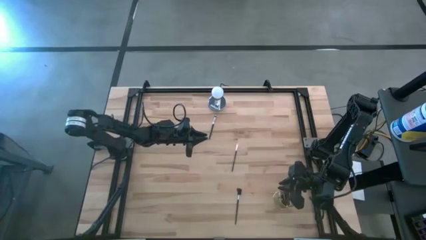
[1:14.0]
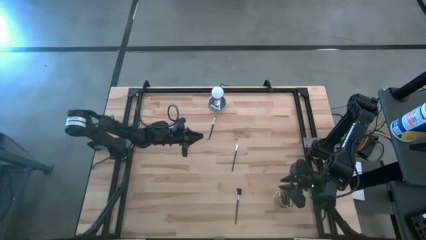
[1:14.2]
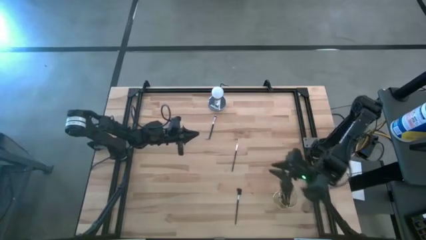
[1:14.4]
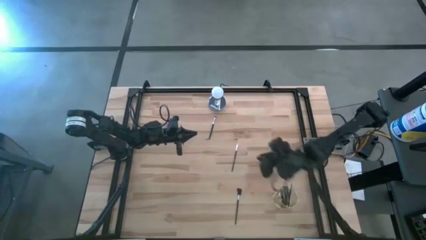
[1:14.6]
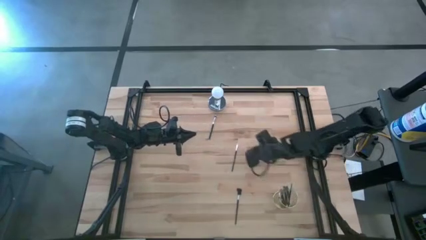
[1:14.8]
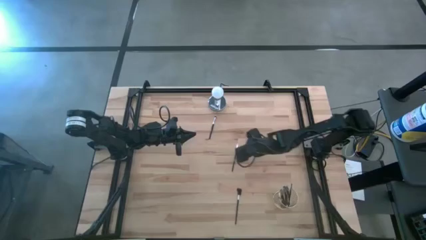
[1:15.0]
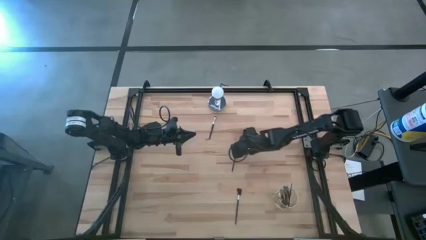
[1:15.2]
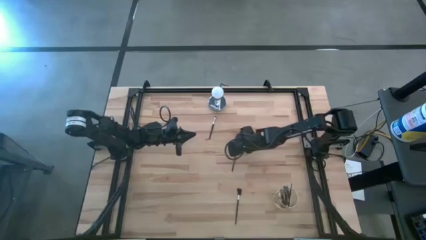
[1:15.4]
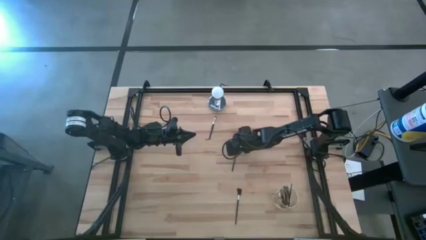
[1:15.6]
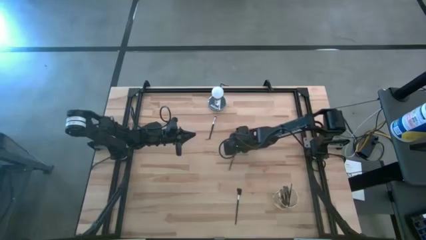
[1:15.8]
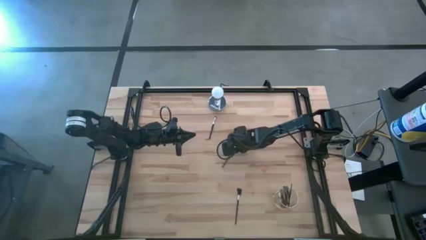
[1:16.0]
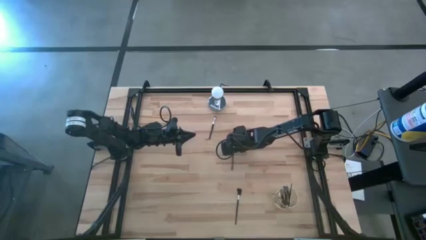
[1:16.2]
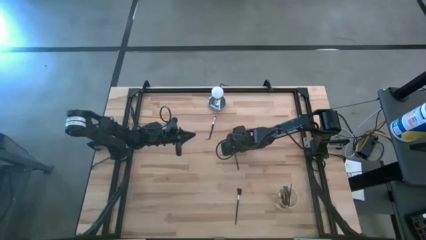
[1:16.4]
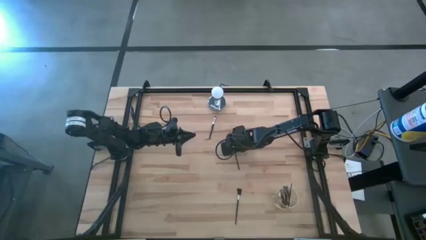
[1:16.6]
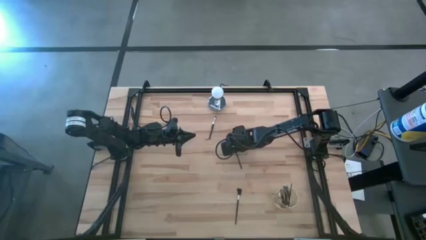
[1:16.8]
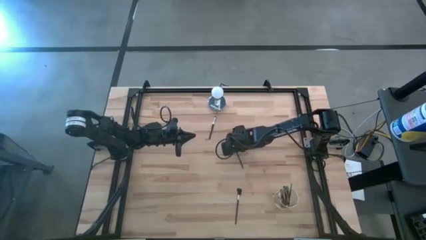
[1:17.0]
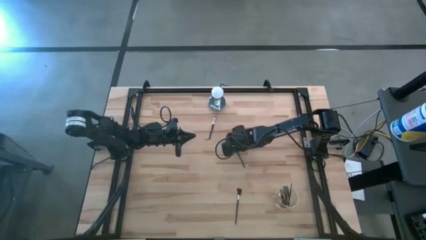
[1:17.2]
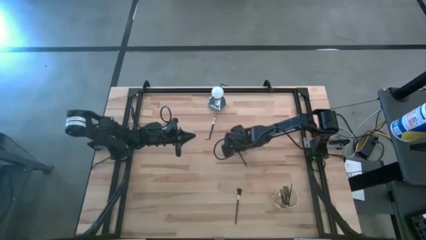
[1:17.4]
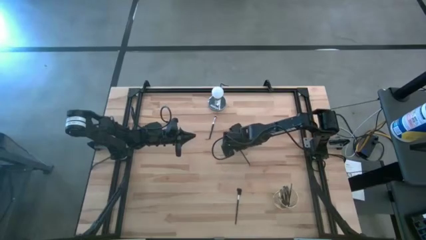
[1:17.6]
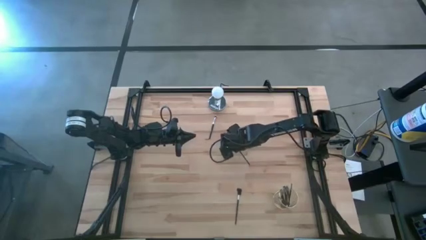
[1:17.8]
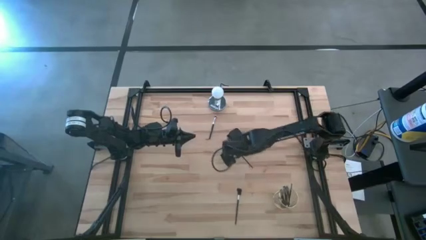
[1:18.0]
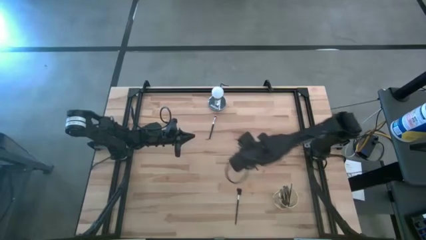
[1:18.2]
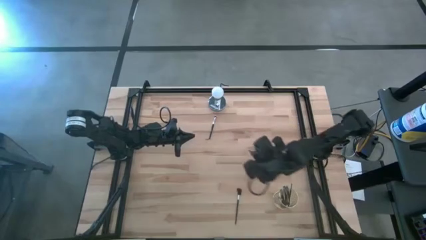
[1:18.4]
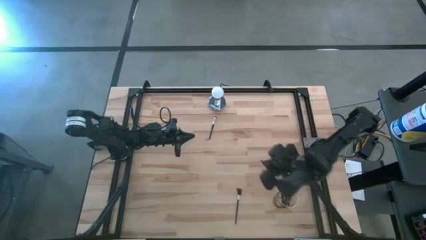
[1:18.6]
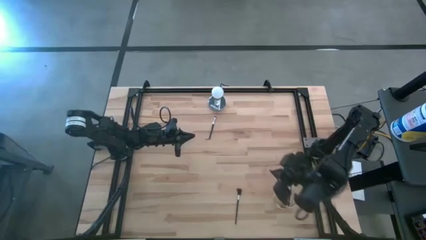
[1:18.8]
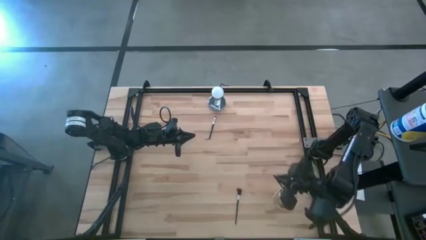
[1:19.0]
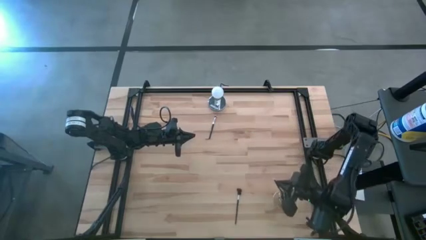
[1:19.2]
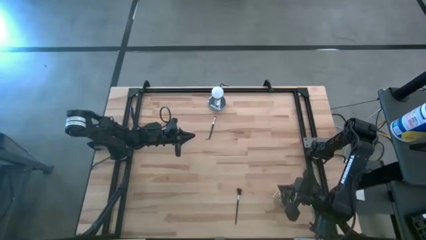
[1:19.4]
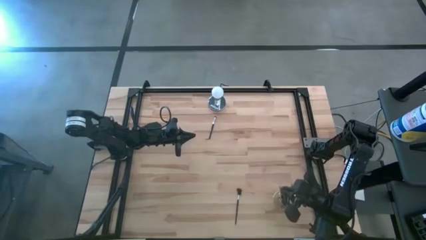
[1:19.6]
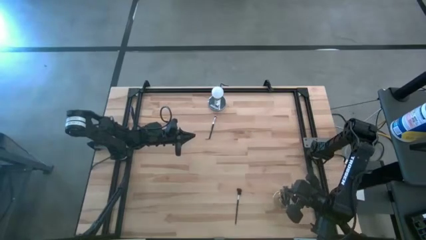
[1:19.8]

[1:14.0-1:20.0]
Task: Pick & Place Makeup Supplies
Put the silver makeup brush into the gold makeup holder

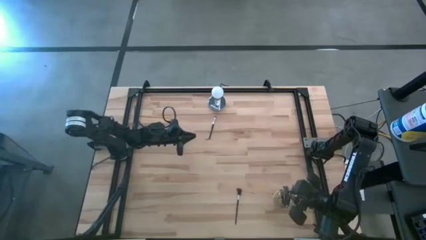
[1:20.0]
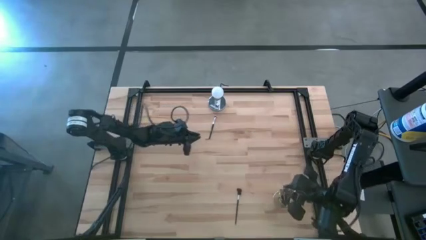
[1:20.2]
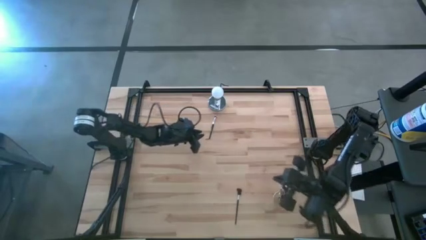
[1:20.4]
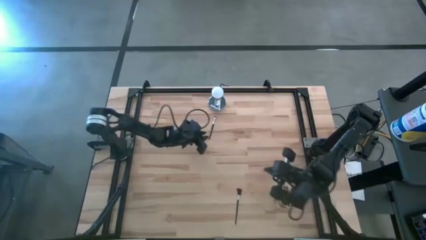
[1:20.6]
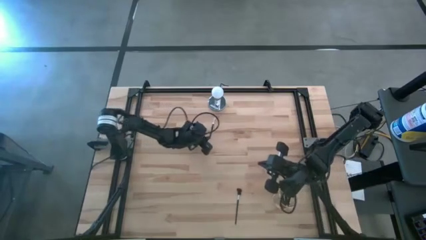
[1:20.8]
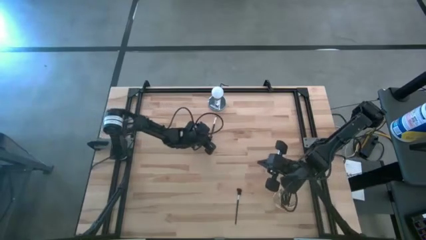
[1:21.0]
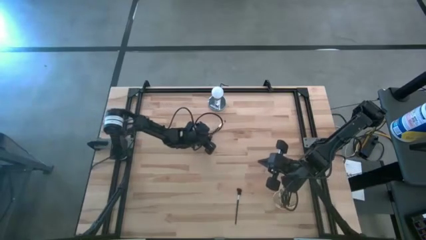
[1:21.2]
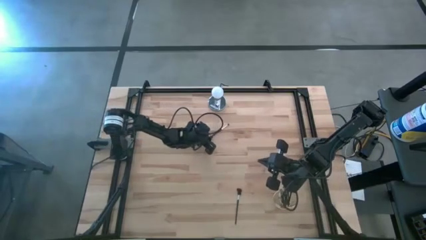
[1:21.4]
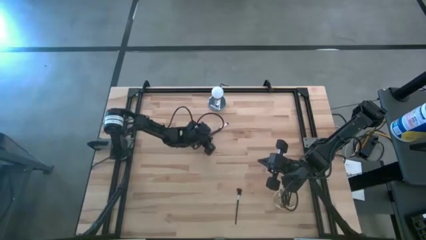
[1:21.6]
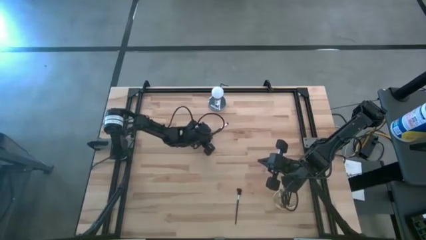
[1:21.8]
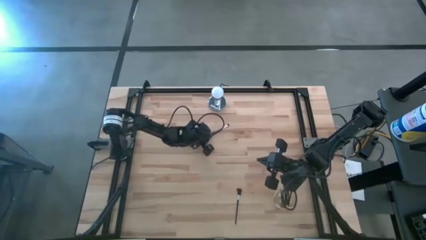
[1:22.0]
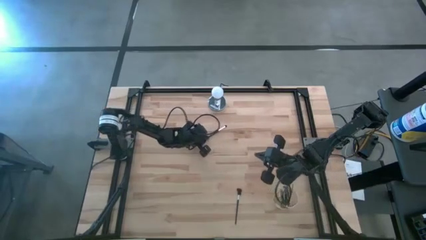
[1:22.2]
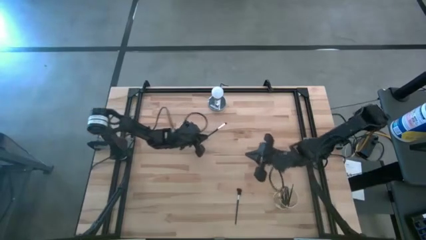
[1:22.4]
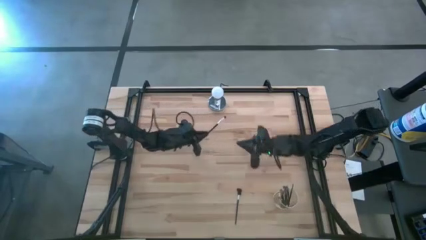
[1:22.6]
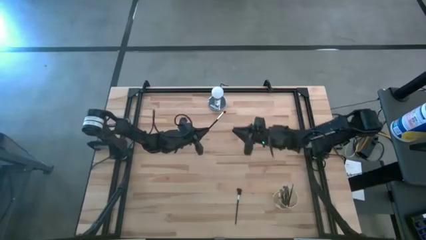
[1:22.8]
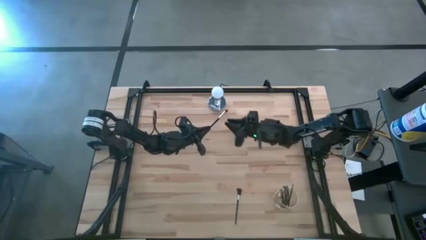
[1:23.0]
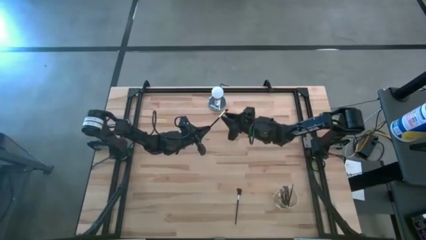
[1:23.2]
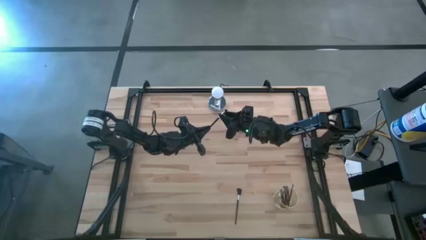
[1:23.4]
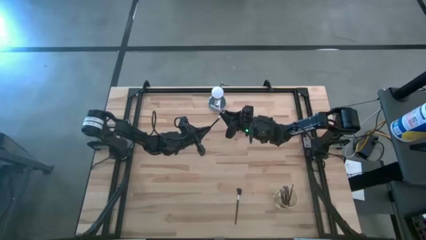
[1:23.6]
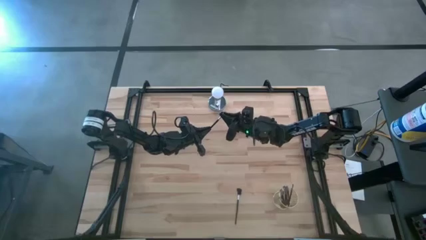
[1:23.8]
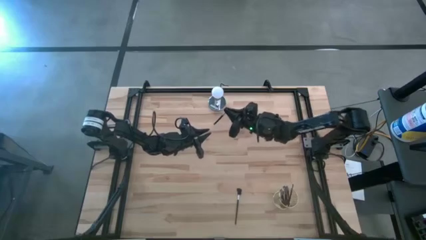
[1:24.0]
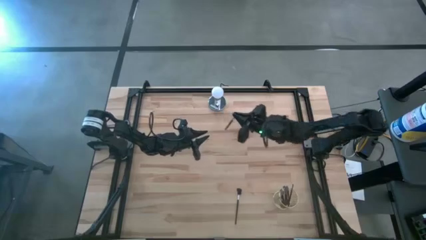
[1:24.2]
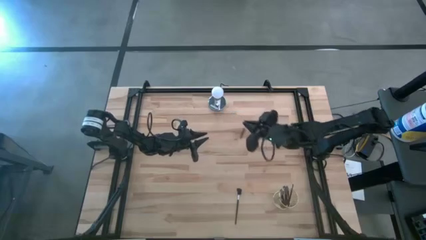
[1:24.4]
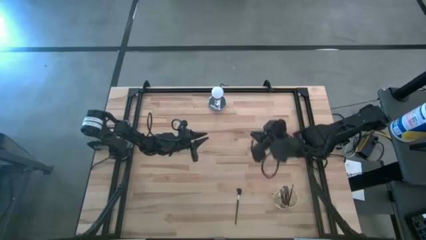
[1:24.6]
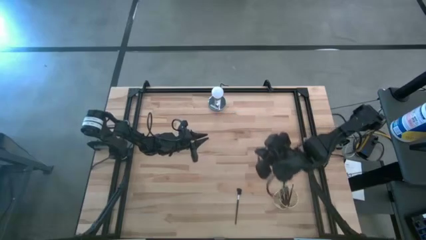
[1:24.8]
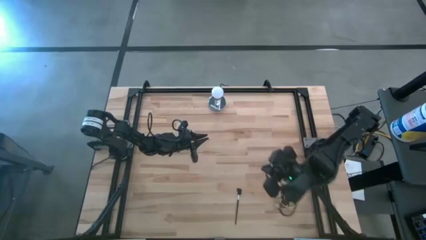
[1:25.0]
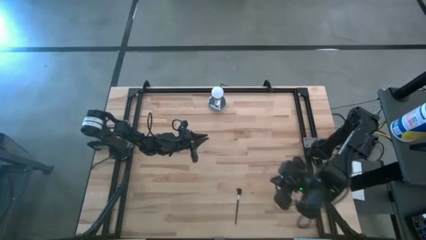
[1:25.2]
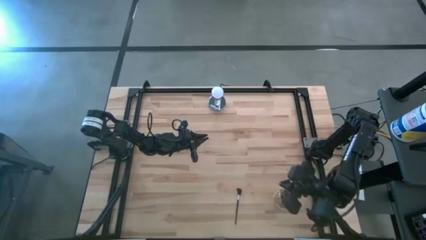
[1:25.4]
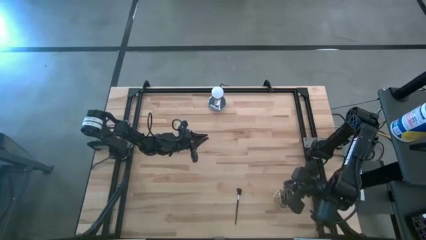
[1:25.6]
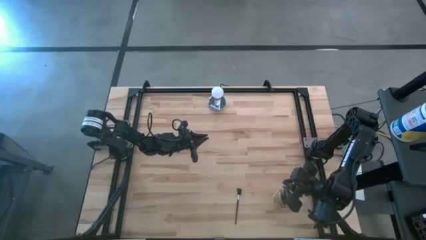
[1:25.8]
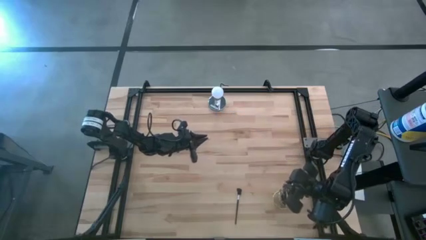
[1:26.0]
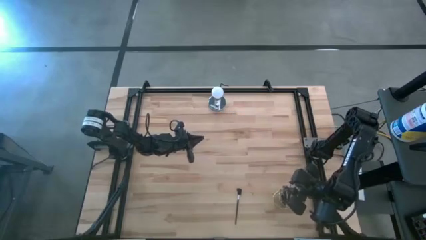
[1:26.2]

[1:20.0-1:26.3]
Put the silver makeup brush into the gold makeup holder

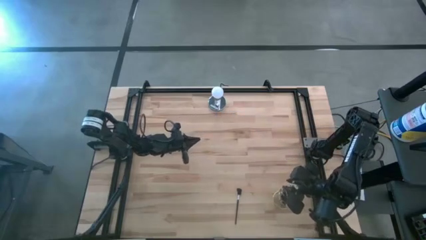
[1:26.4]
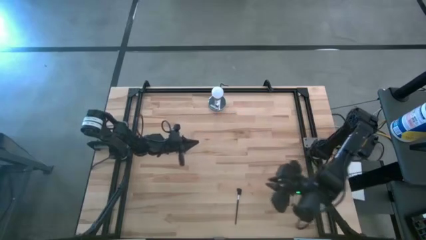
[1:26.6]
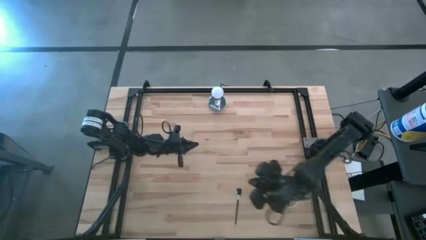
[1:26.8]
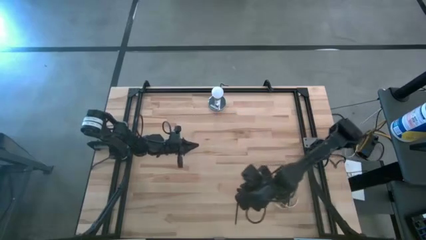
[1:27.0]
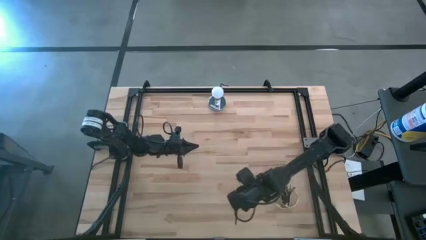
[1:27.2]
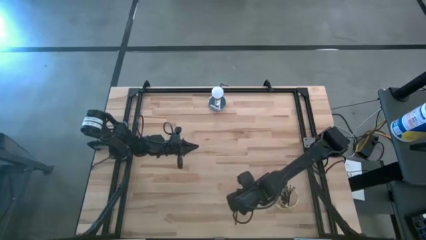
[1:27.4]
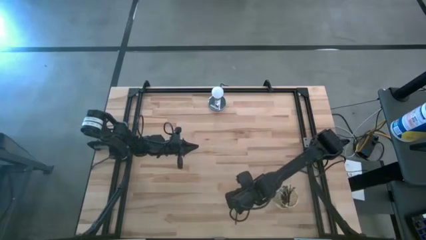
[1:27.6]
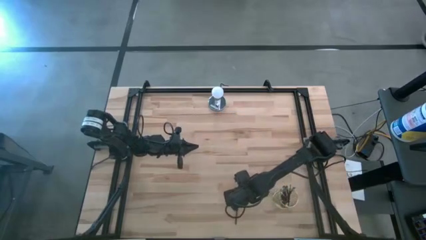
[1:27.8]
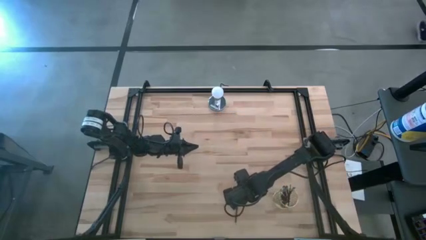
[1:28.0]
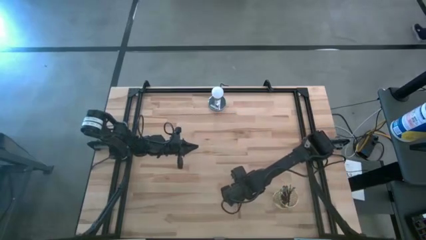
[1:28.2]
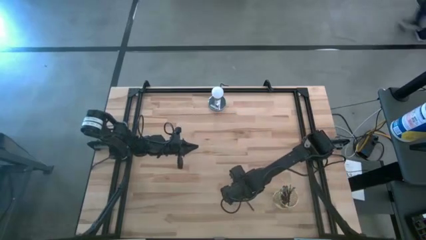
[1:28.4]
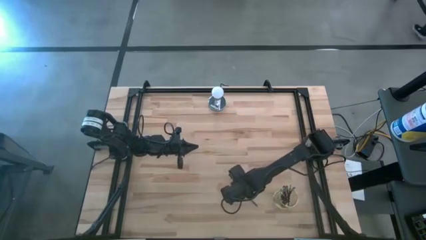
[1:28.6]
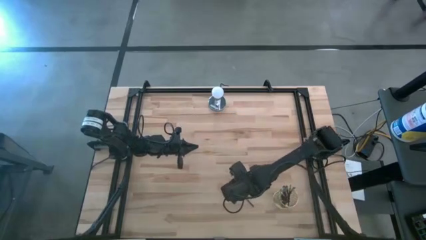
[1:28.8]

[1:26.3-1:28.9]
Put the silver makeup brush into the gold makeup holder

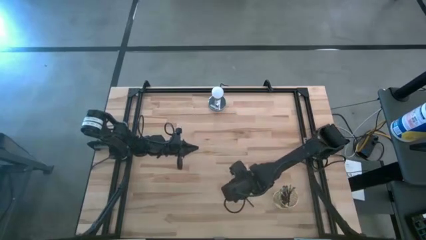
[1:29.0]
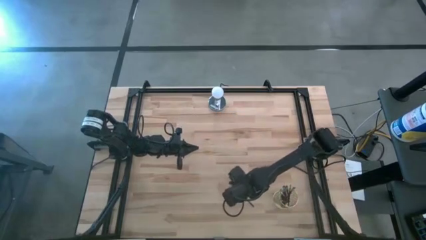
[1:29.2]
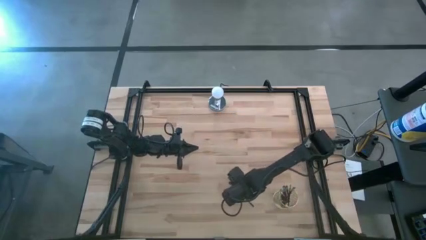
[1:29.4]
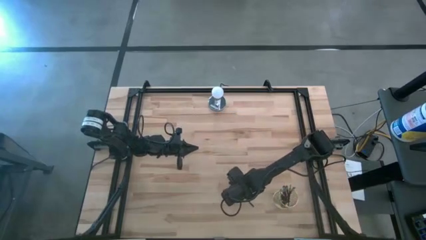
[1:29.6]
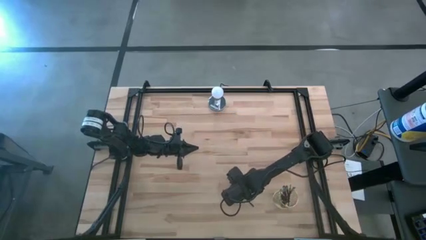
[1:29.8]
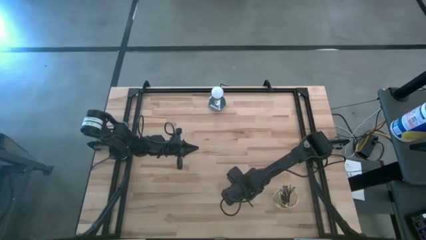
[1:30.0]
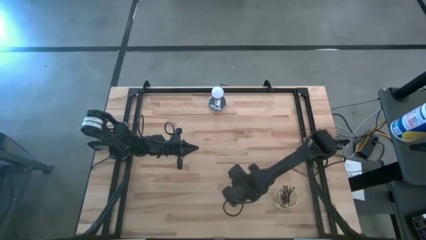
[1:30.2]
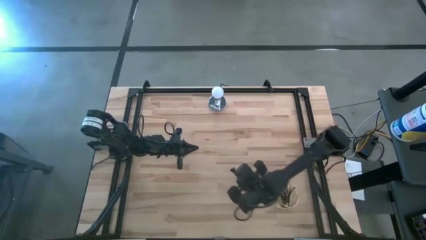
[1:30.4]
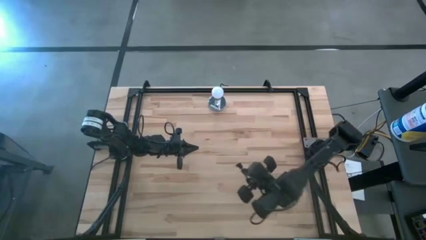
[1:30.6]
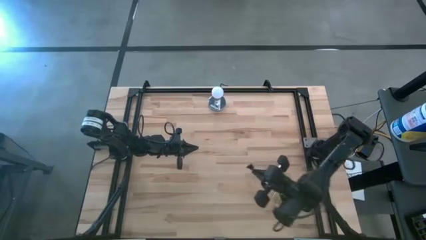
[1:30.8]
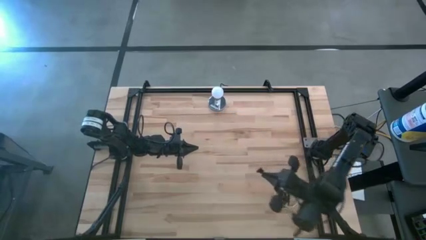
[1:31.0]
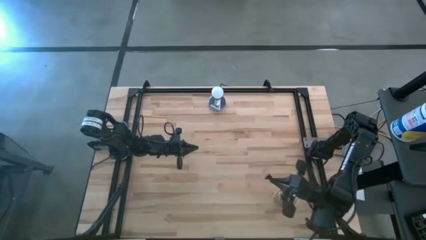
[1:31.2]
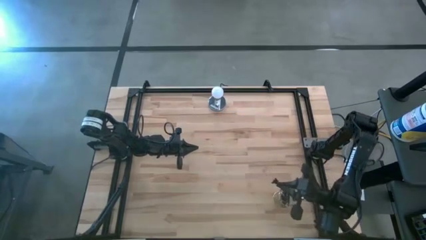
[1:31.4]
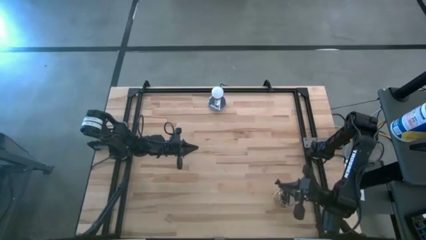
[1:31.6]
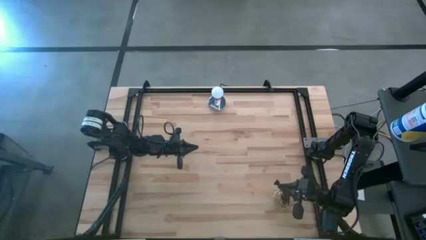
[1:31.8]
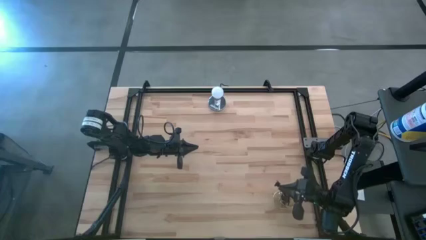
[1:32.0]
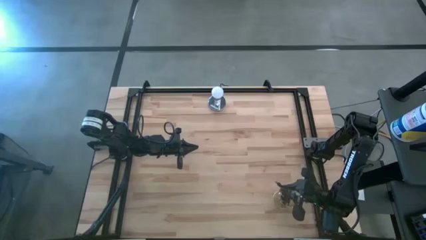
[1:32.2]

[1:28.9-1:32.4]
Put the silver makeup brush into the gold makeup holder
